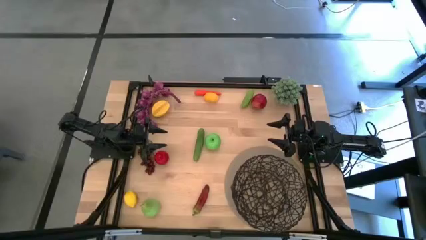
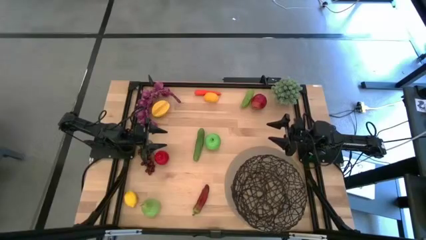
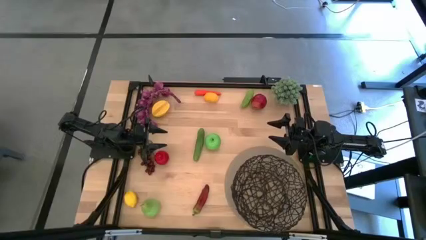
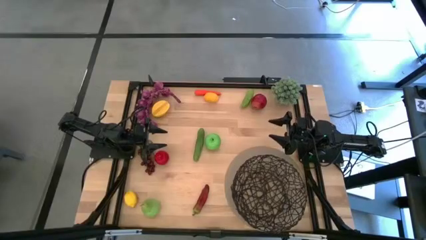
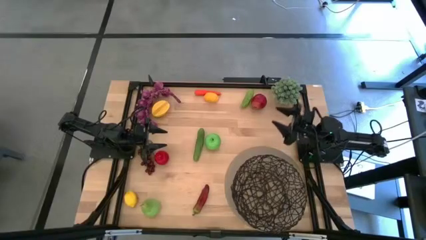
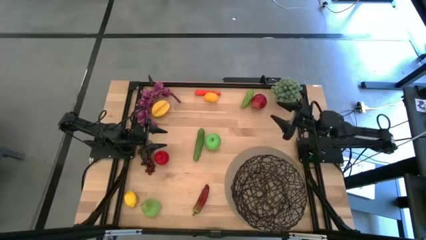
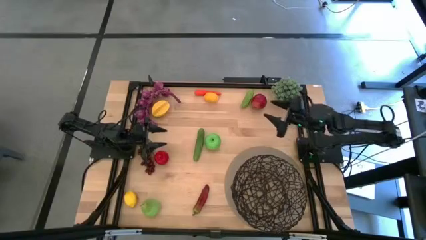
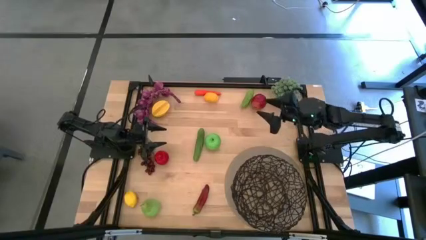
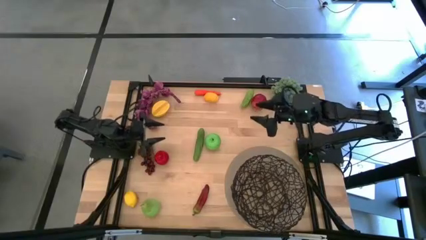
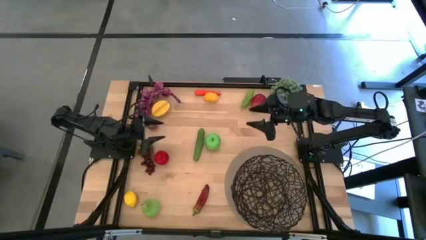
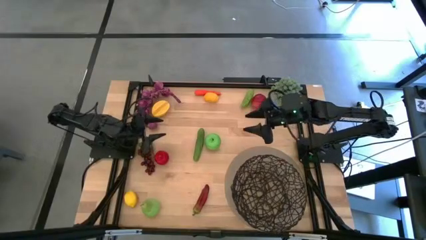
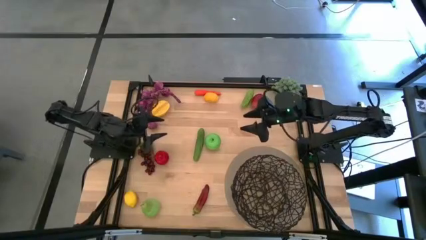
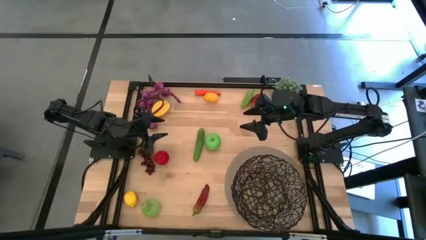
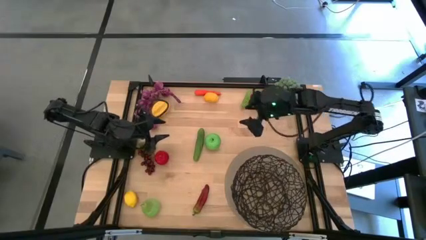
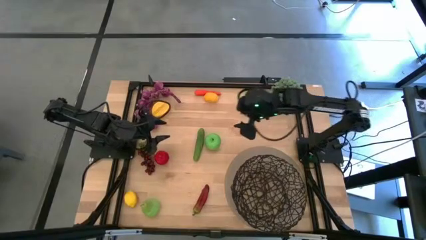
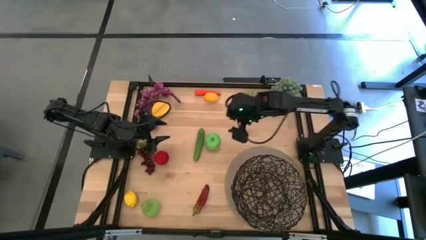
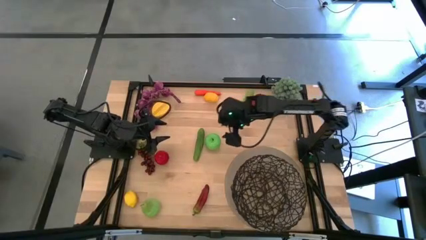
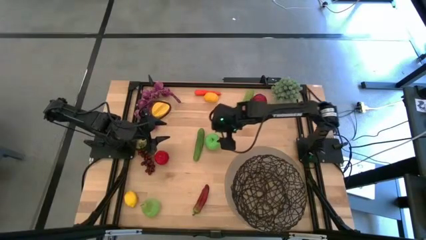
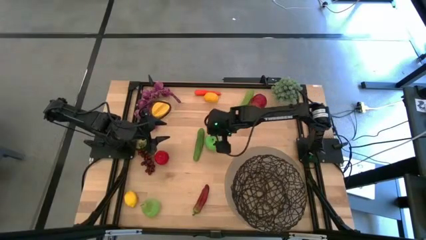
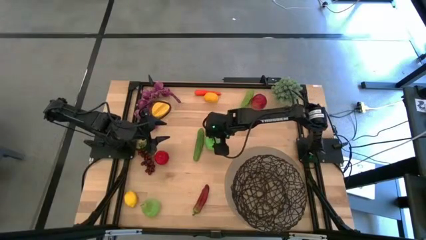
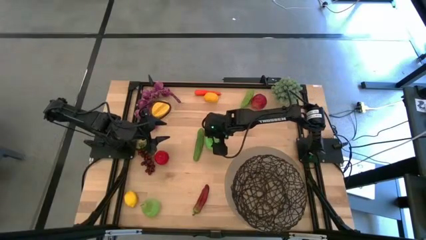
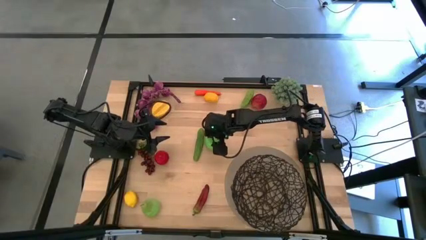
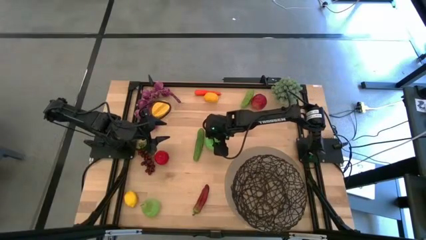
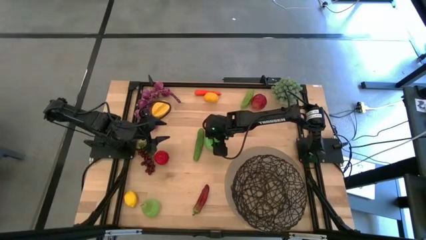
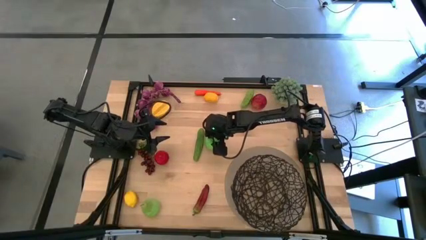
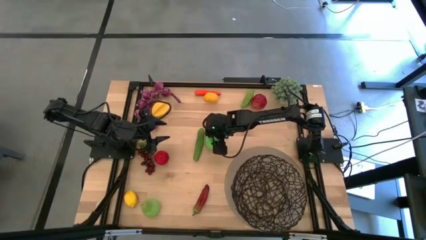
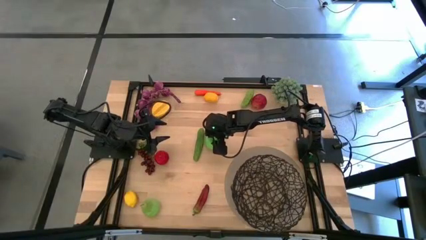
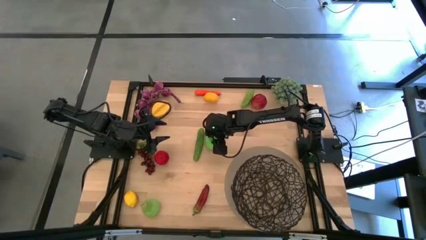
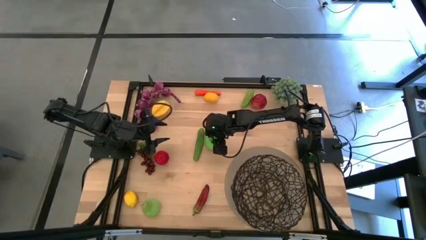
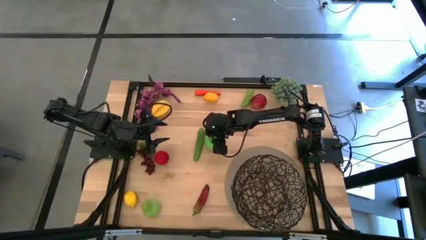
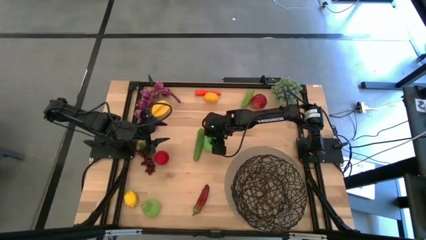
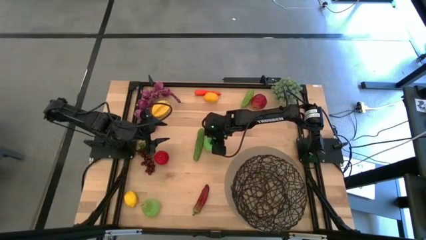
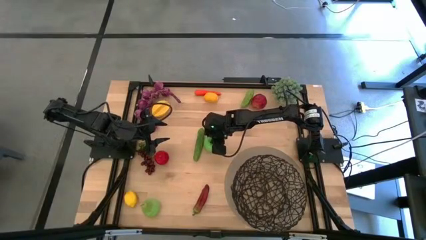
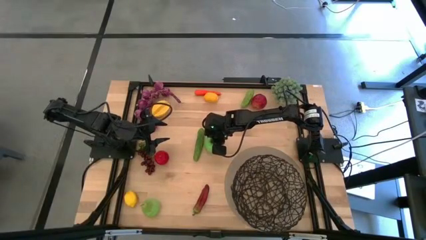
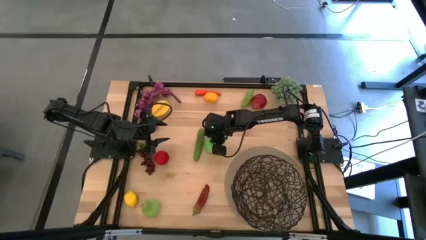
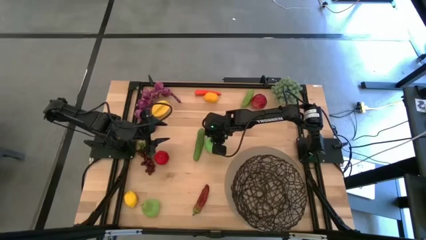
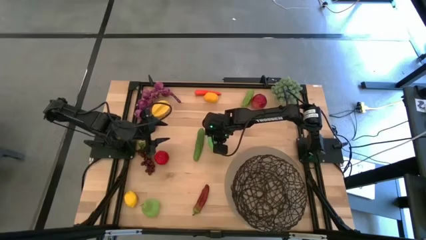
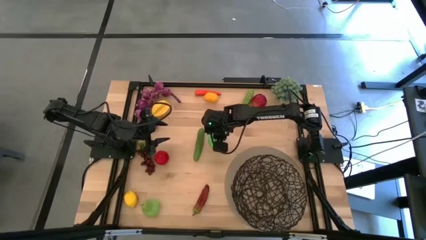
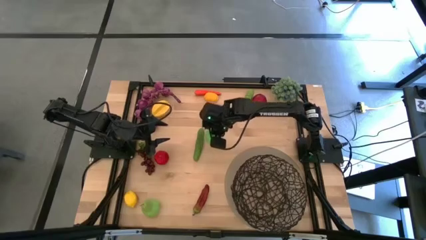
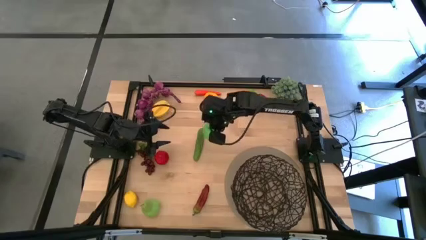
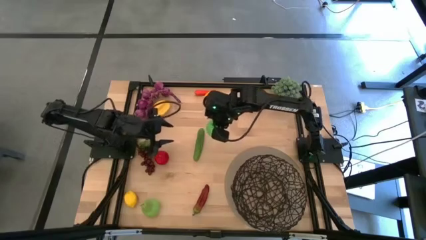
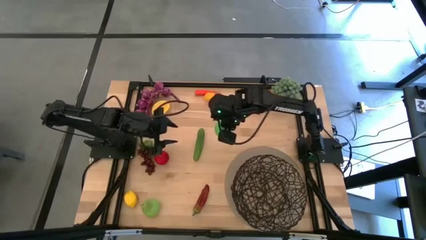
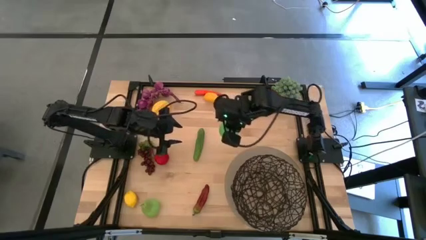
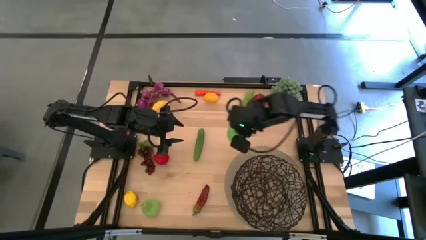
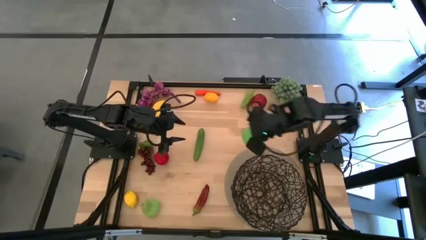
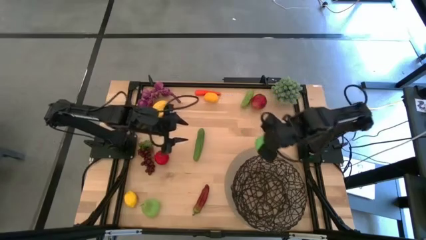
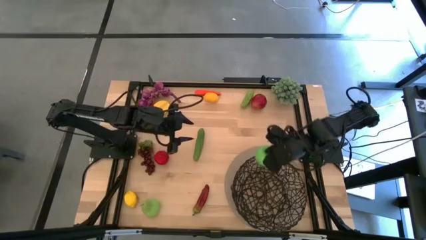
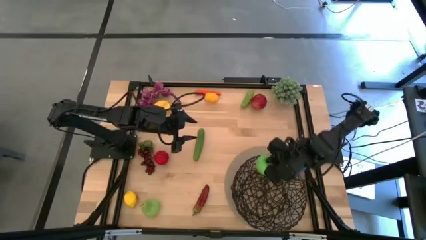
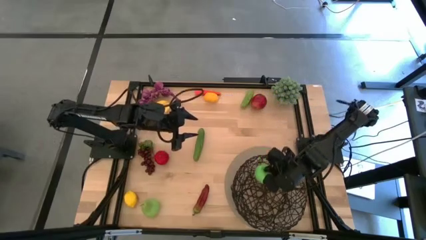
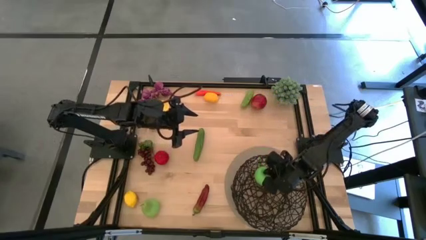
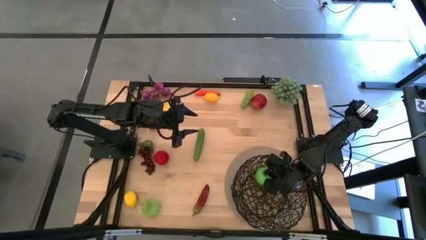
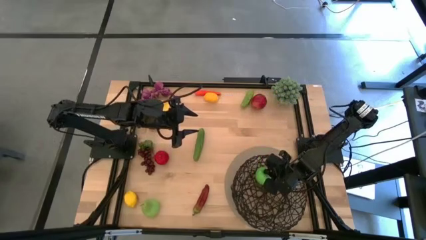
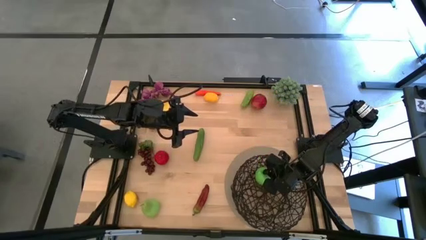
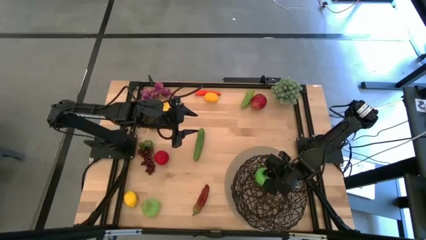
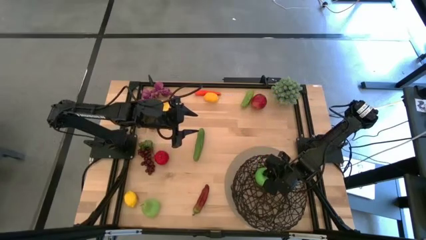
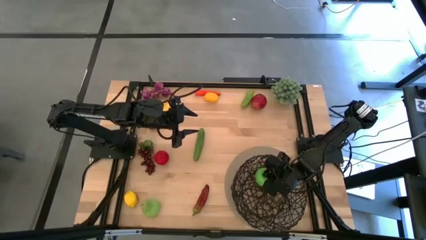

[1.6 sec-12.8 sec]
Task: Build produce basket
Put the green apple into the wire basket
